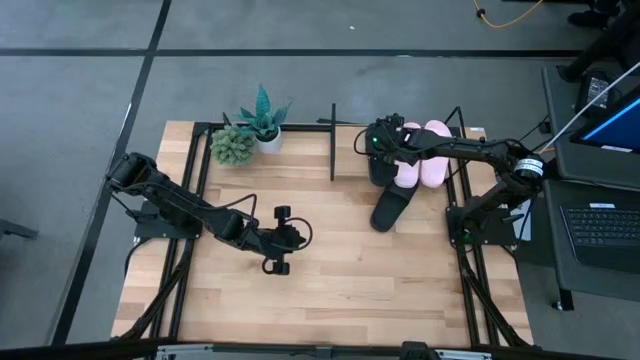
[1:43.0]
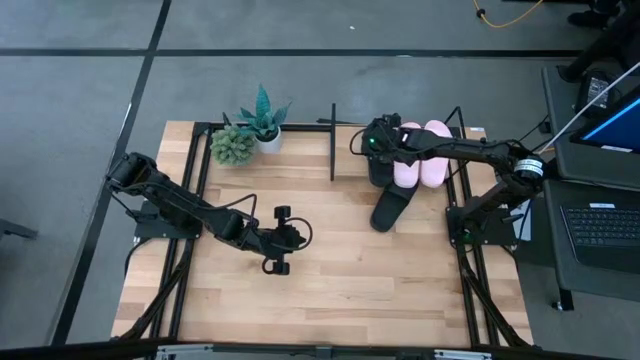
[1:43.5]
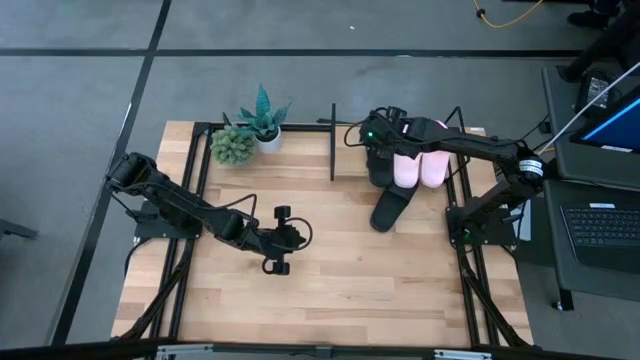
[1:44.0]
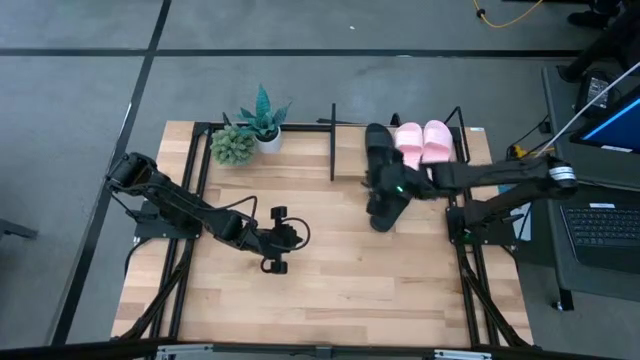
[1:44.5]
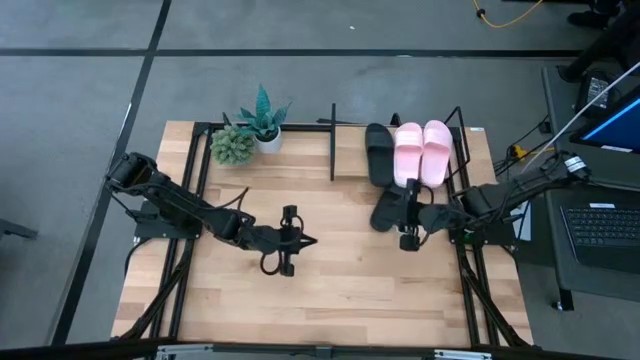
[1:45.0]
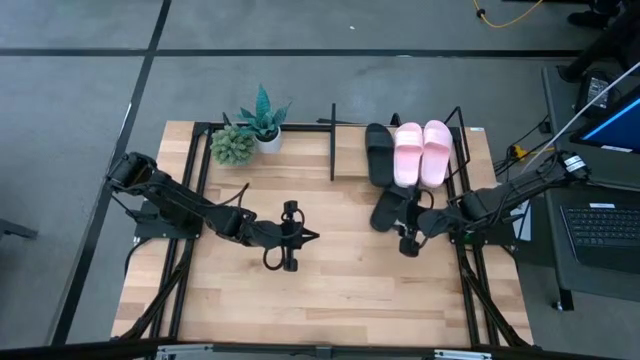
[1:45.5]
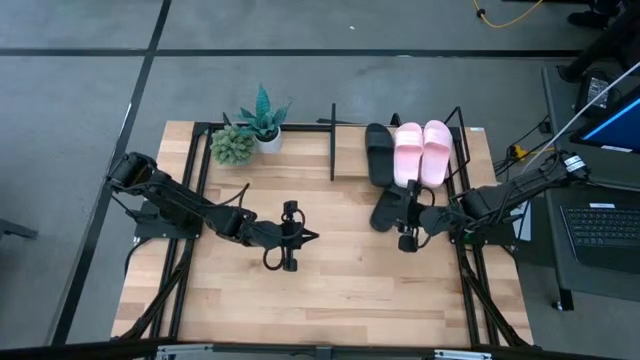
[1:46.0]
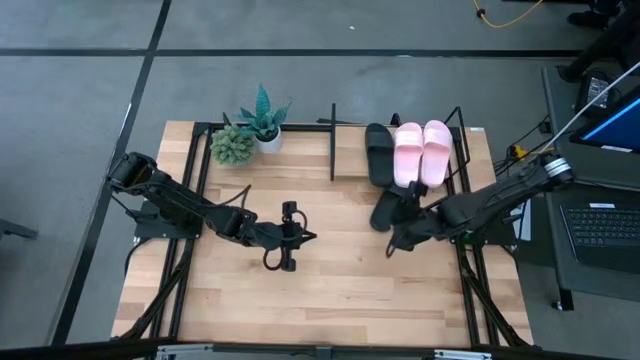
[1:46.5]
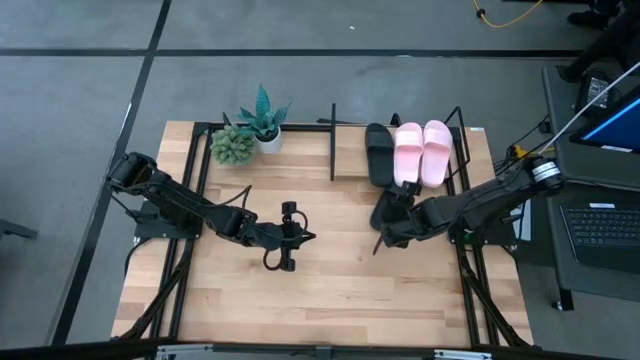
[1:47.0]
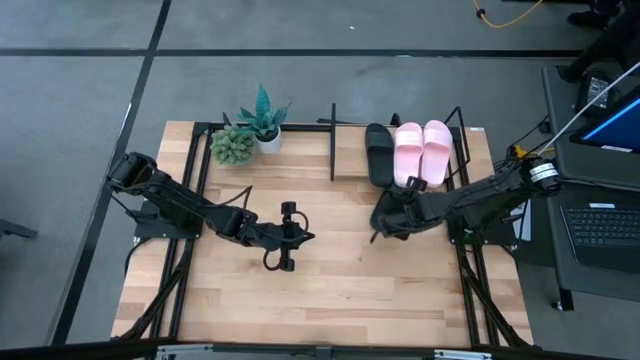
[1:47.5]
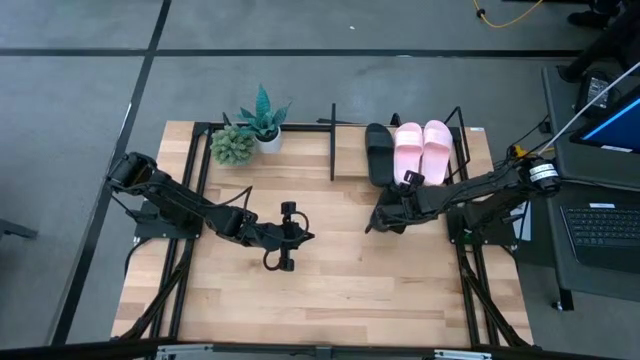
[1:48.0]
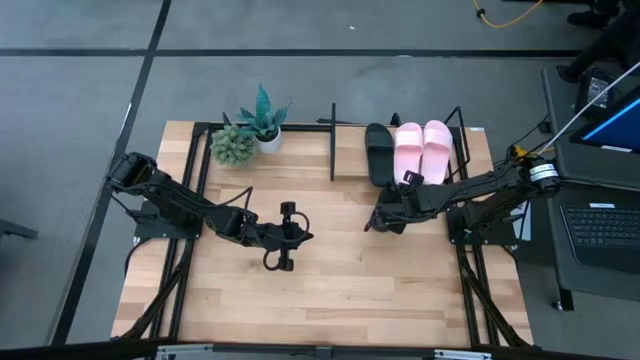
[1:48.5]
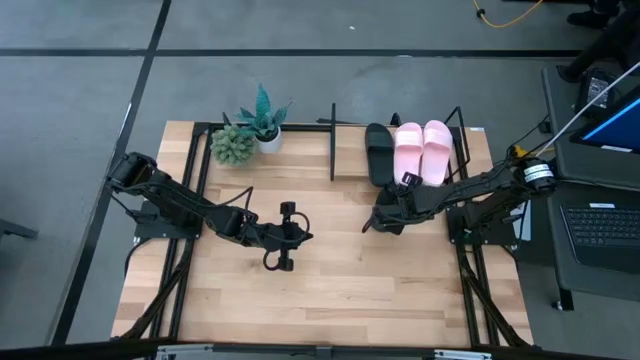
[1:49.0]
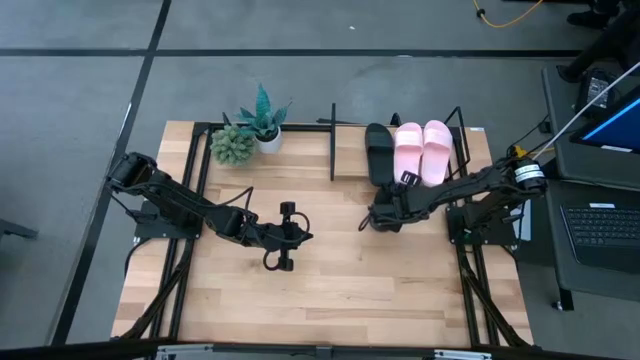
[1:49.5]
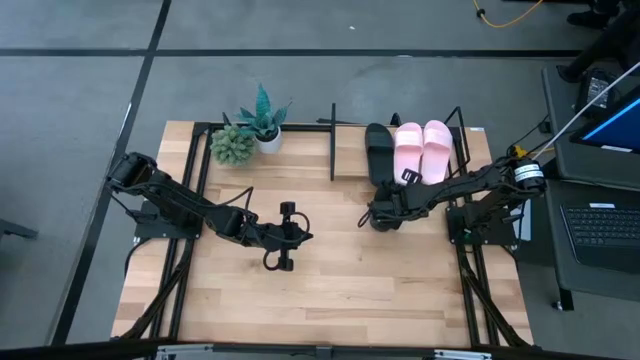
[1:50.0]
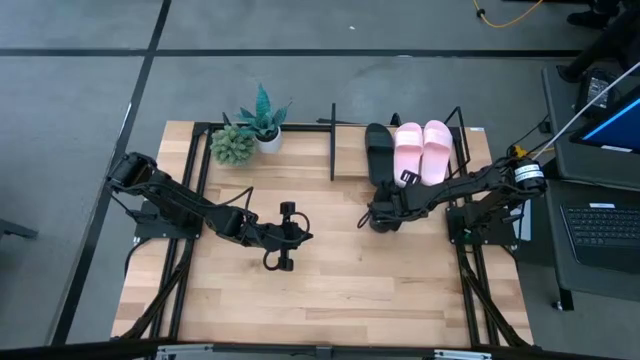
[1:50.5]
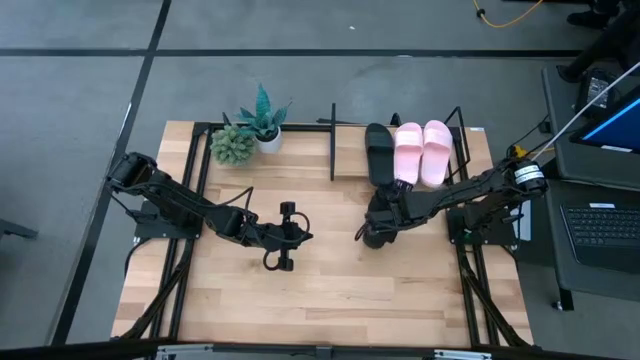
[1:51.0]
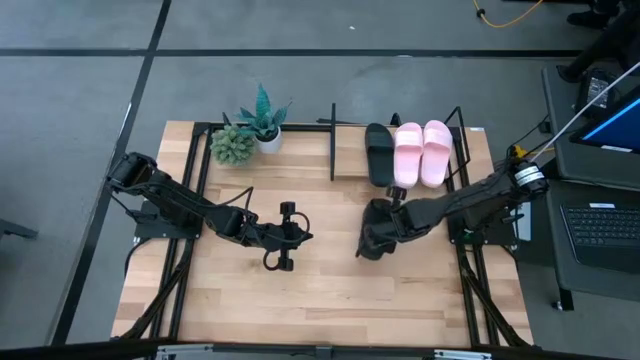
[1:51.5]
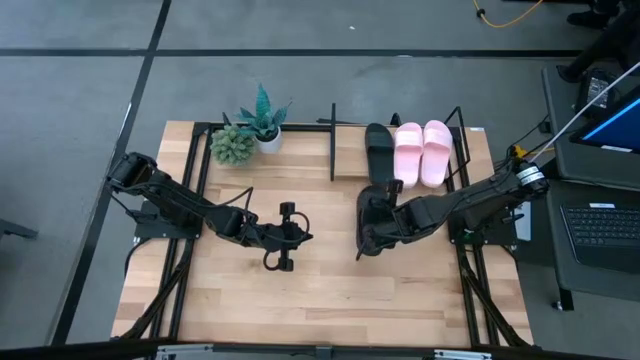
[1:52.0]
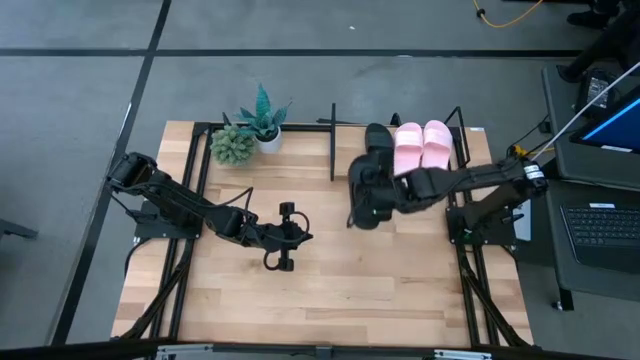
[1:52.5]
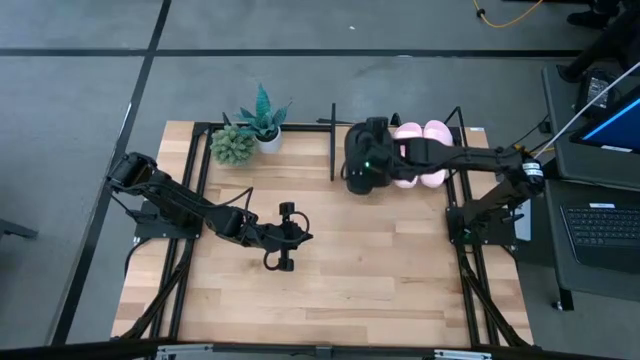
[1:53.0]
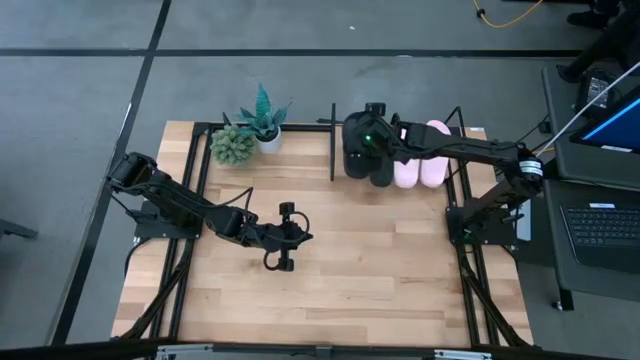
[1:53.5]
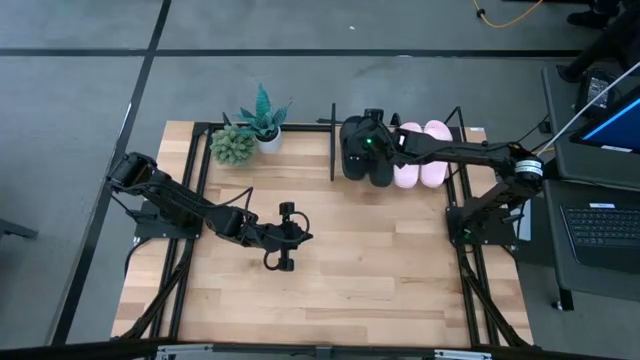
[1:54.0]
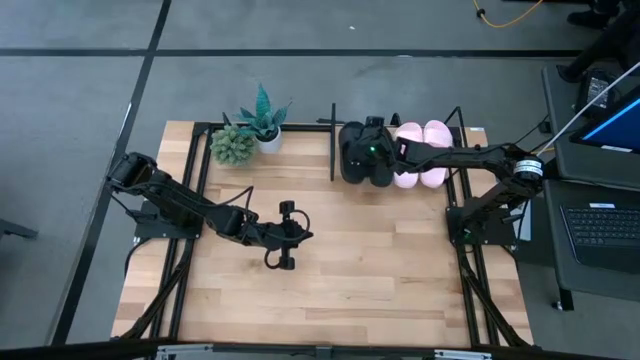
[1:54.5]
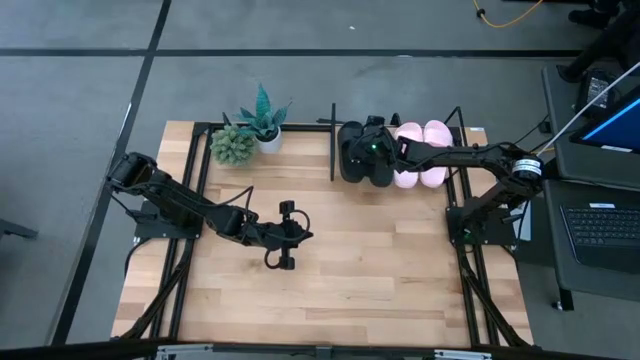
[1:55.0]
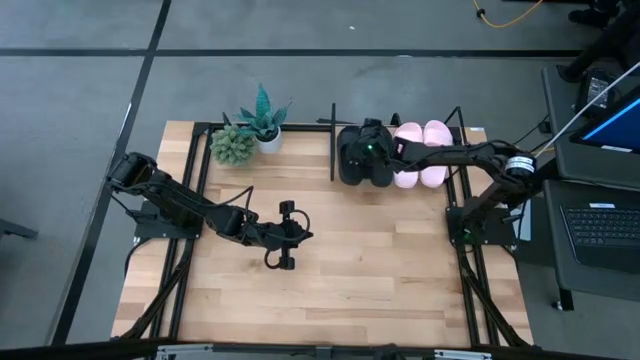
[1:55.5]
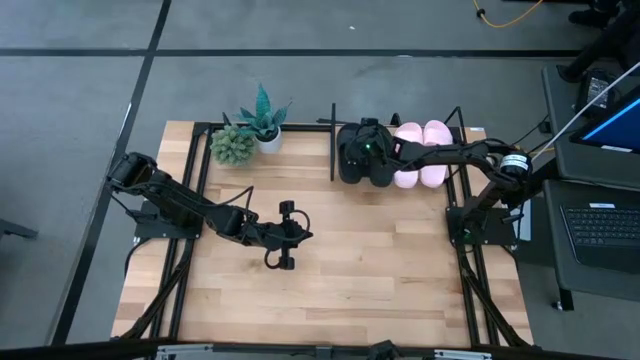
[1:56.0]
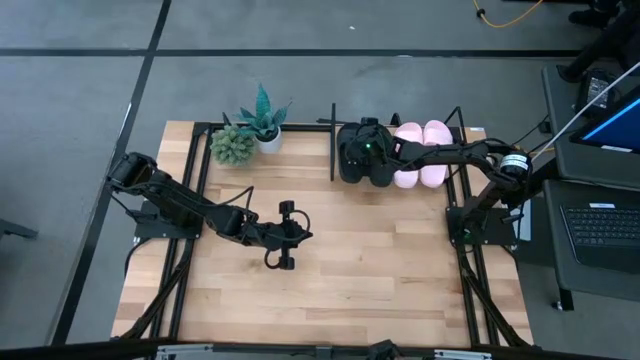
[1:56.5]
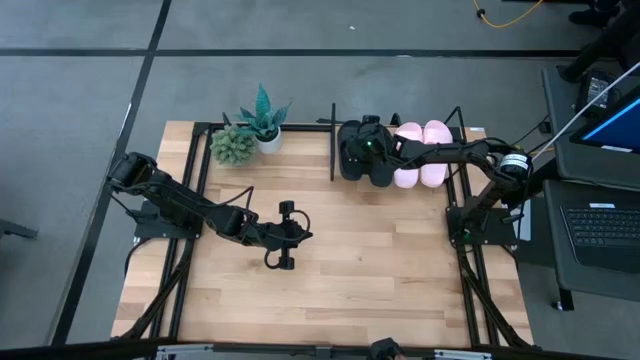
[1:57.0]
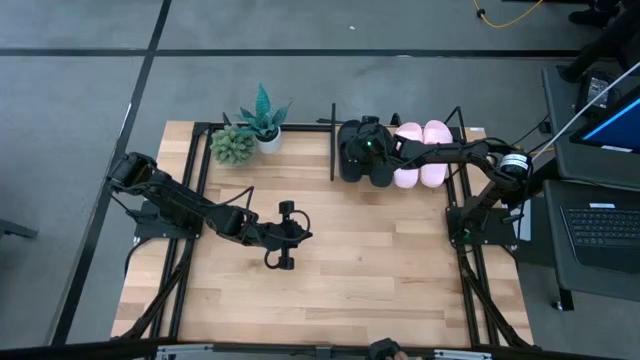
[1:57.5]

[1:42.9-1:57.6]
Task: Pick and place slides into the shelf
Put the black slide on the shelf

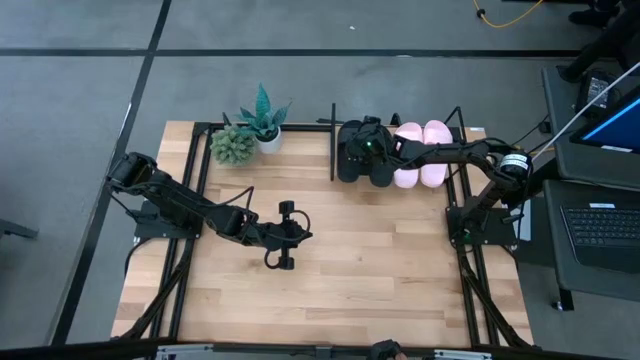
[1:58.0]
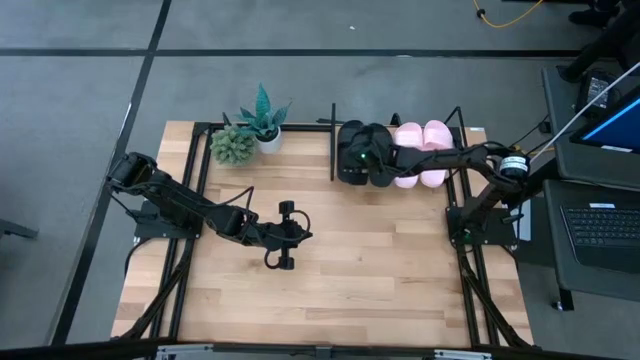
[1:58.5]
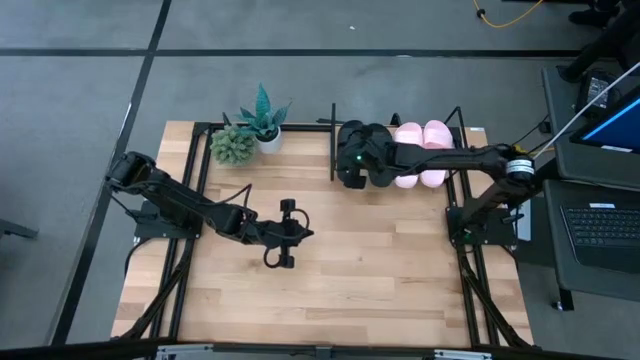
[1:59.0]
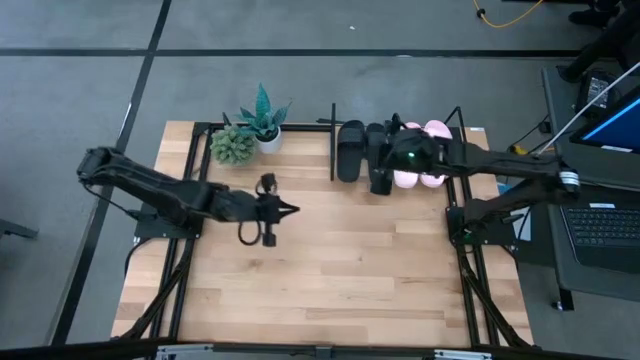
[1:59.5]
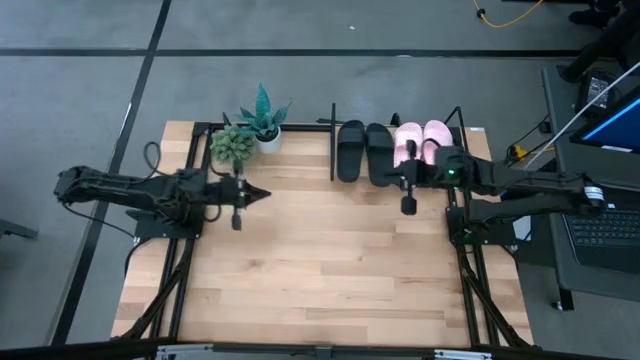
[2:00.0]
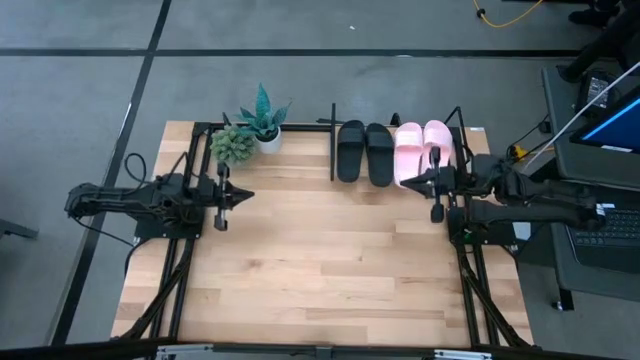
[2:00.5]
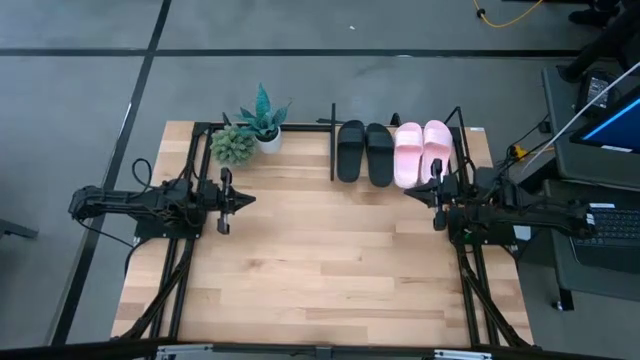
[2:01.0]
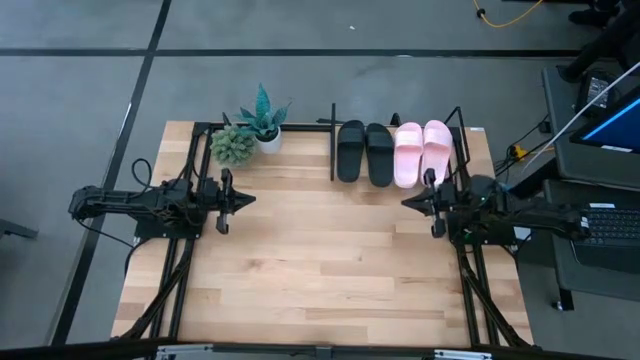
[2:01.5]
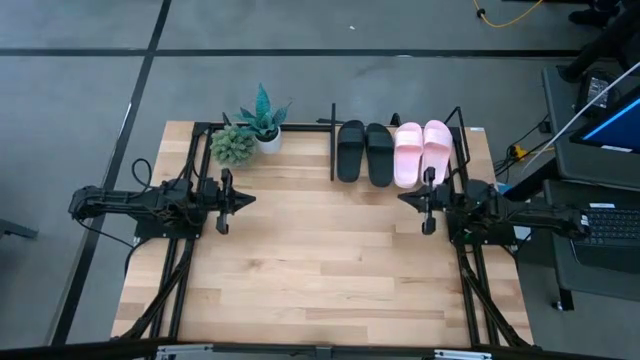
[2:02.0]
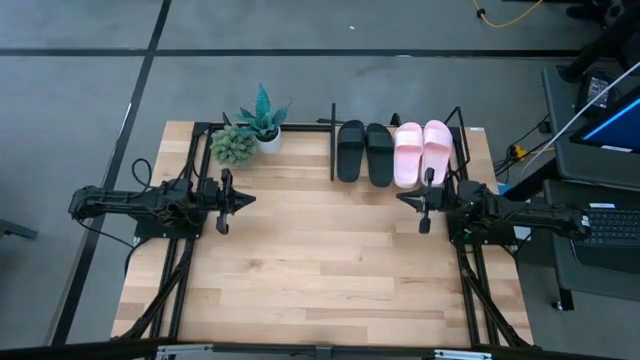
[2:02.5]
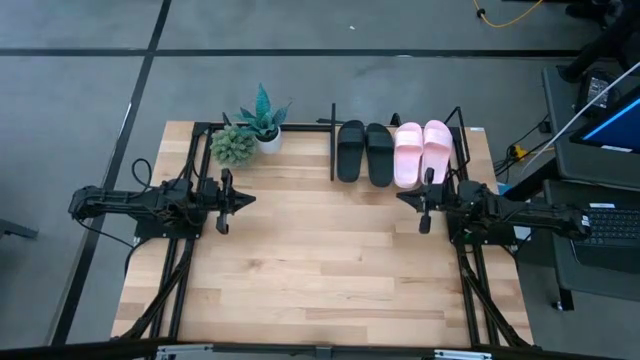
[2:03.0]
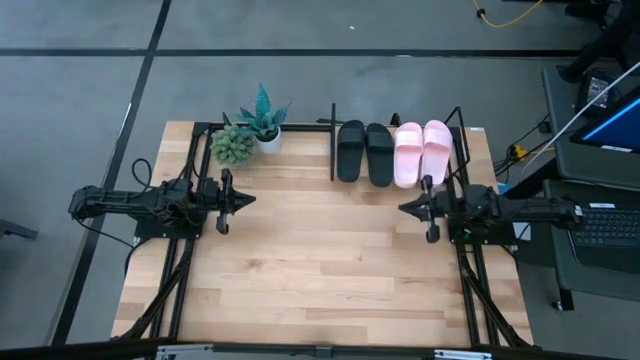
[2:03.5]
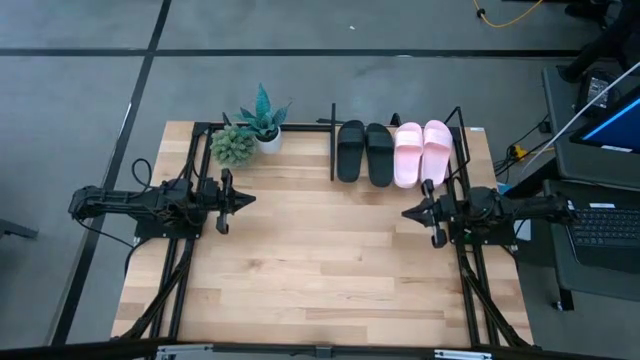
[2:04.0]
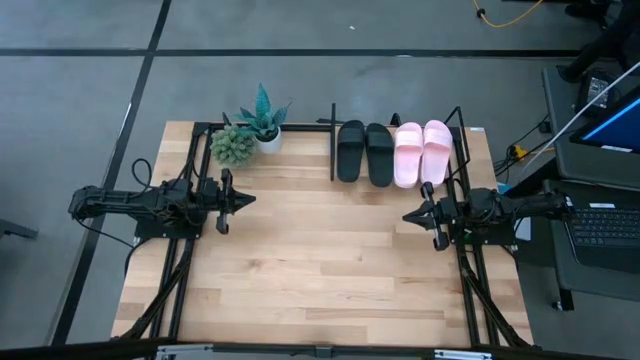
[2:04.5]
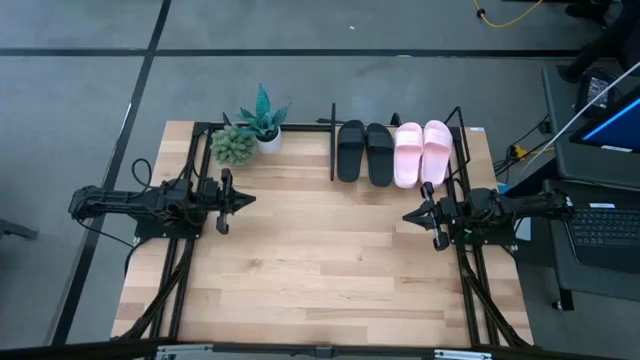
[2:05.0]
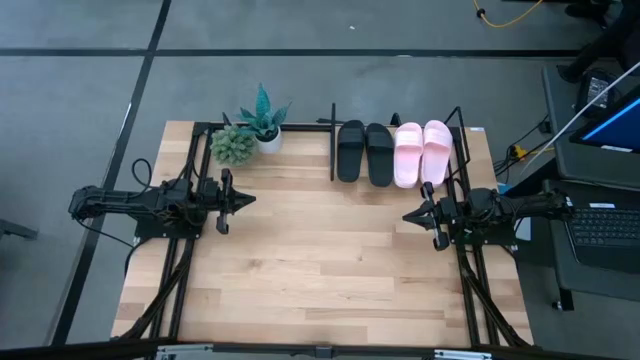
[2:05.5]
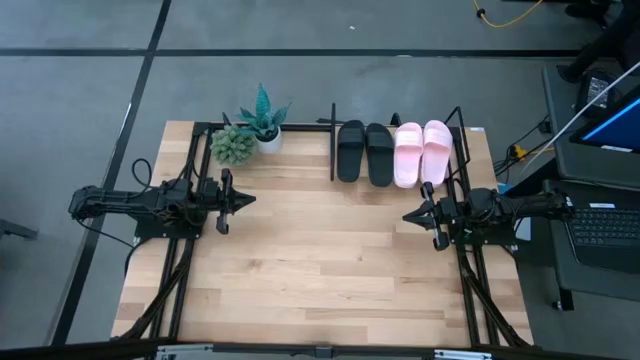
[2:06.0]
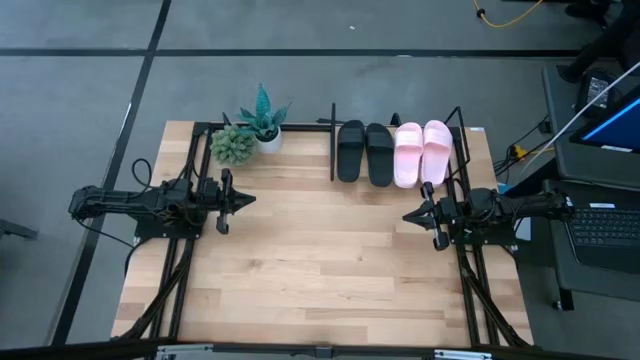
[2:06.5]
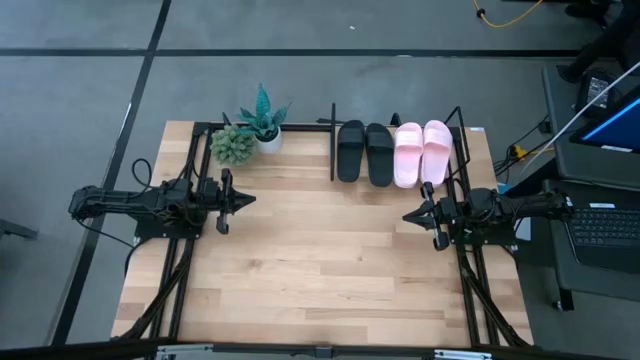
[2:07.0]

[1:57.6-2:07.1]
Return to Home Position
